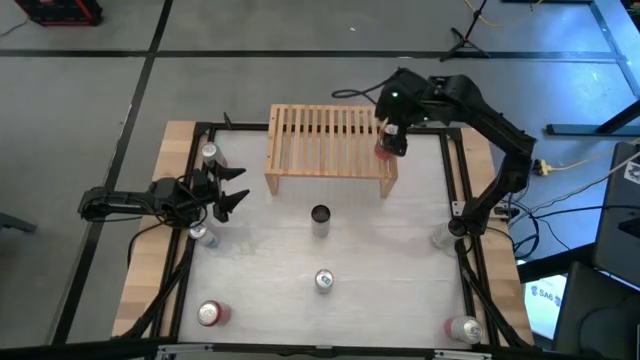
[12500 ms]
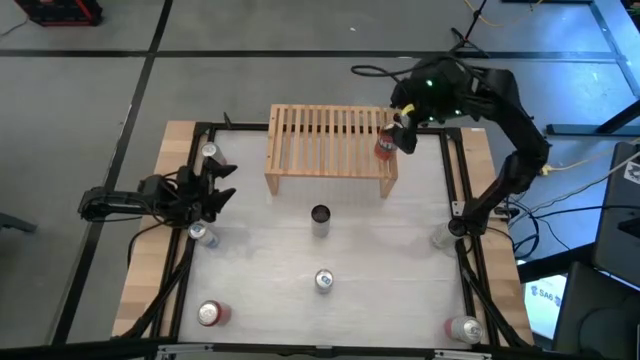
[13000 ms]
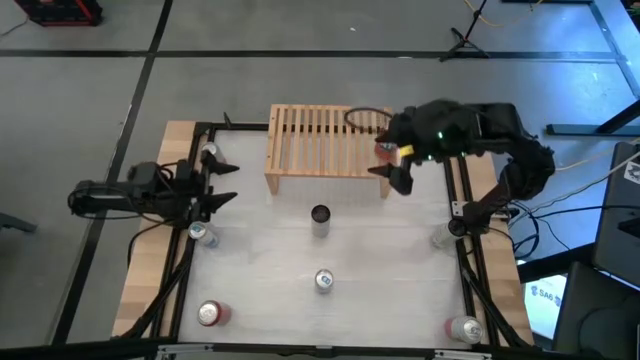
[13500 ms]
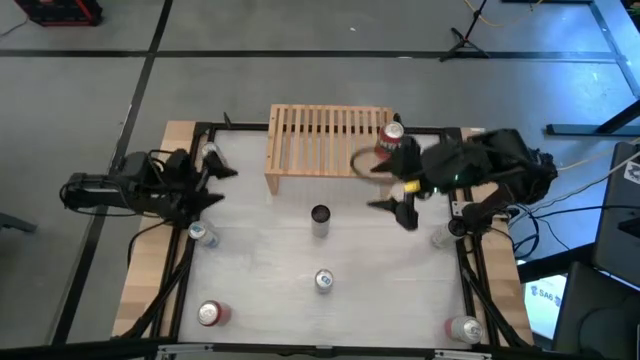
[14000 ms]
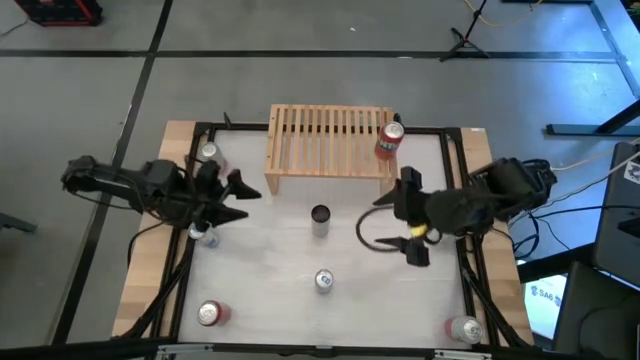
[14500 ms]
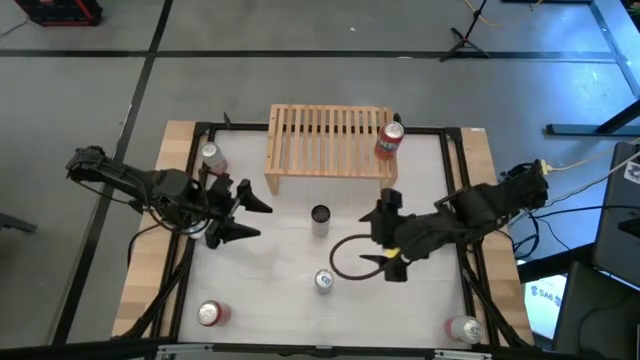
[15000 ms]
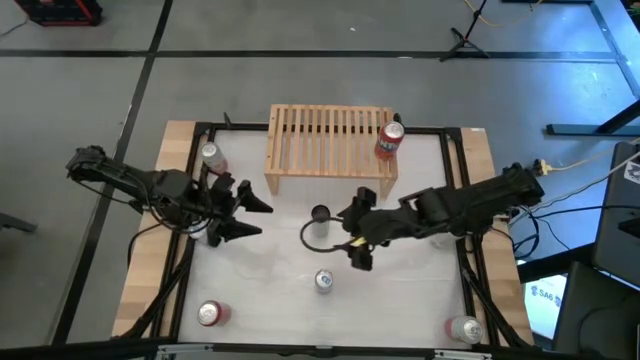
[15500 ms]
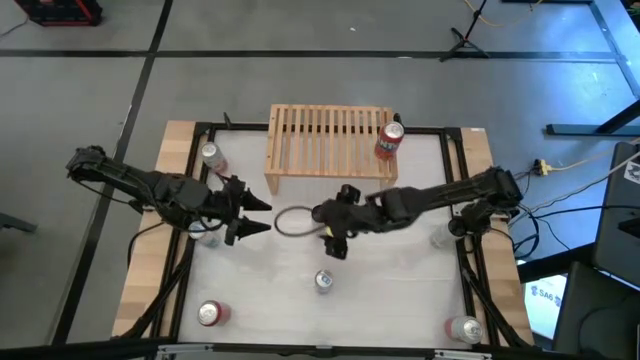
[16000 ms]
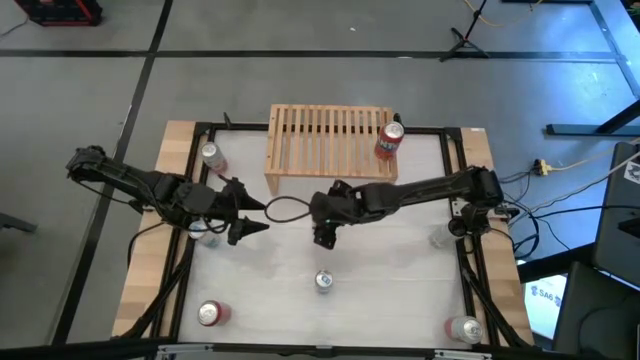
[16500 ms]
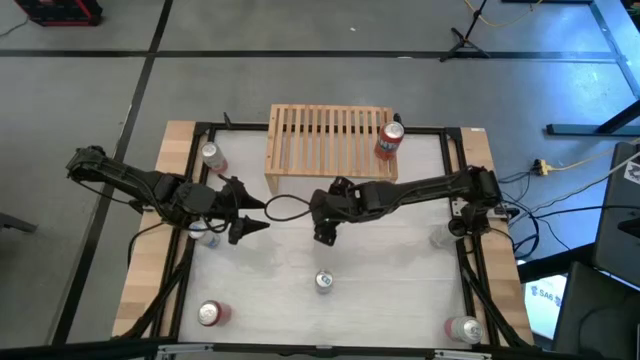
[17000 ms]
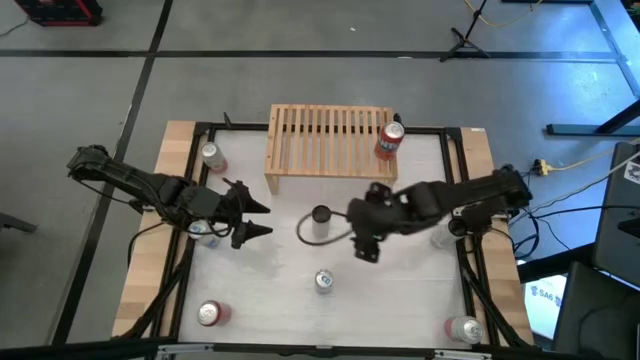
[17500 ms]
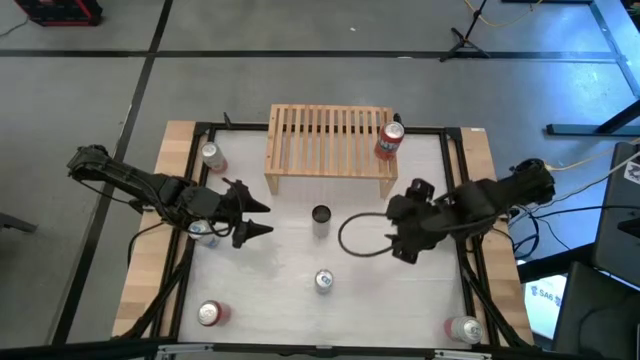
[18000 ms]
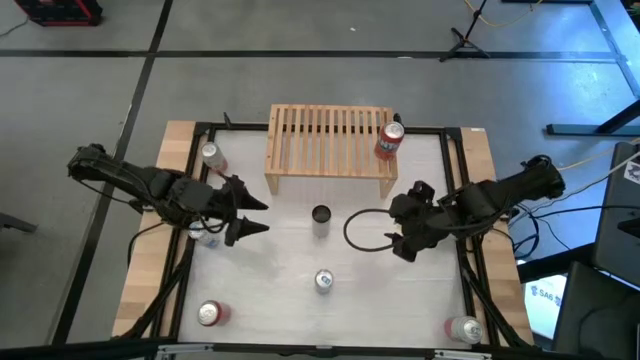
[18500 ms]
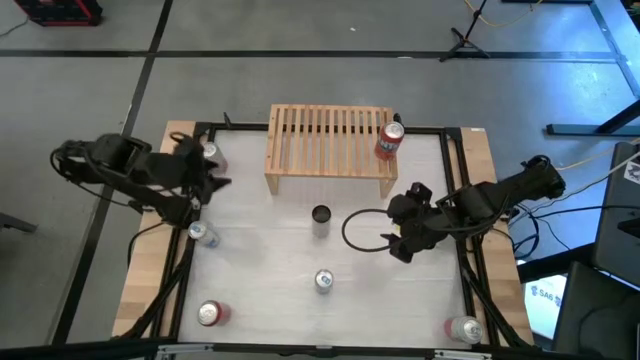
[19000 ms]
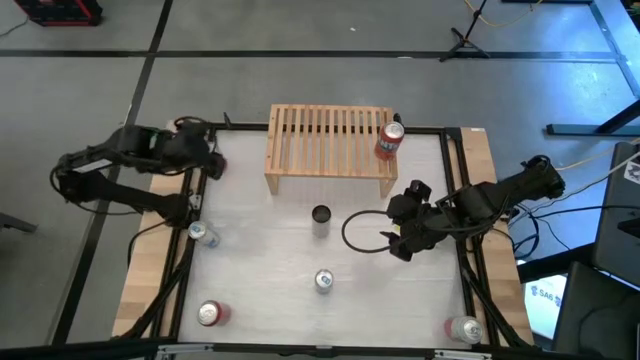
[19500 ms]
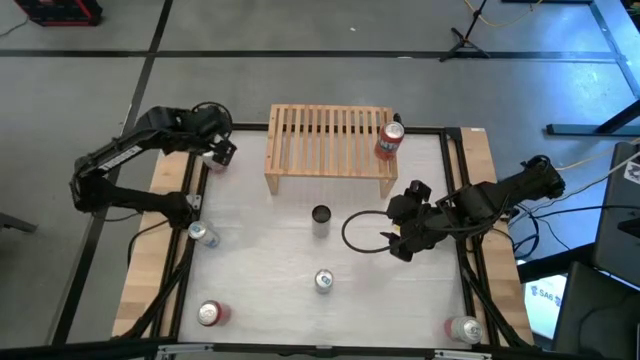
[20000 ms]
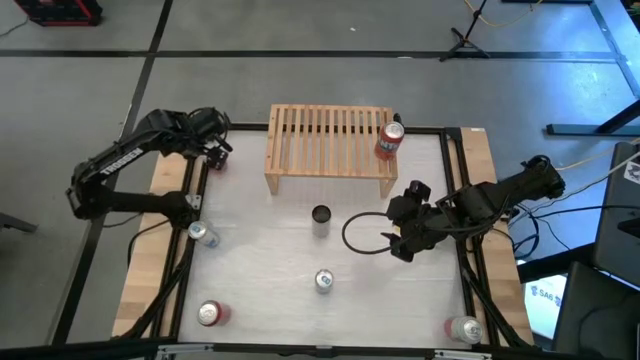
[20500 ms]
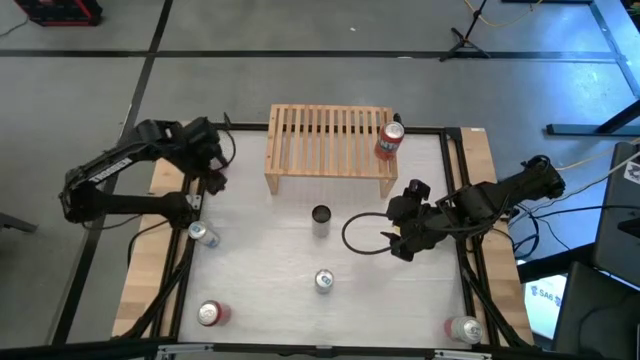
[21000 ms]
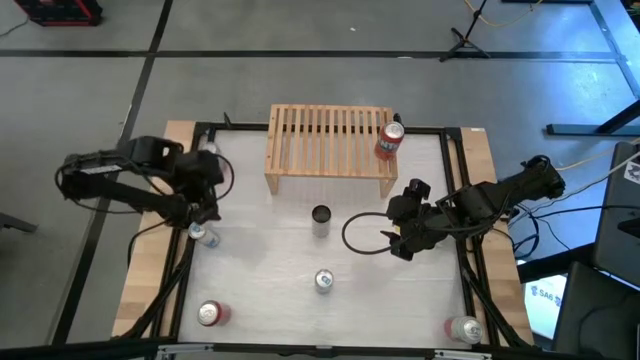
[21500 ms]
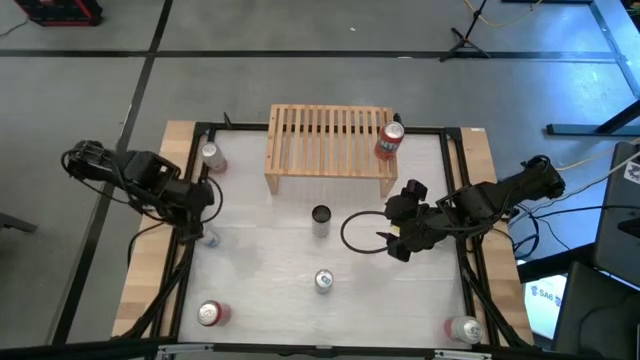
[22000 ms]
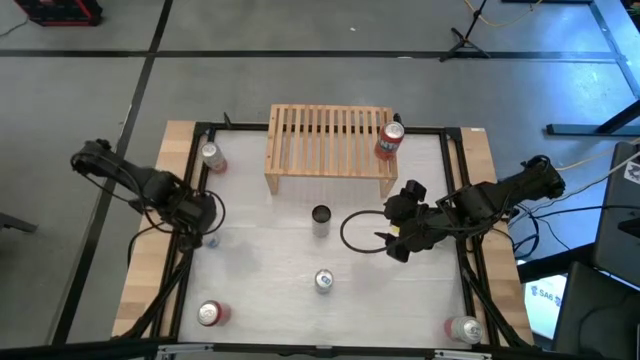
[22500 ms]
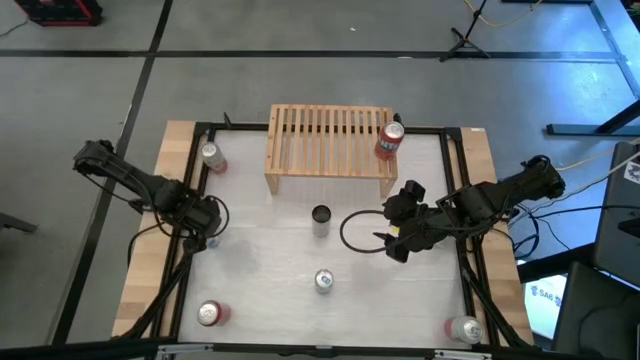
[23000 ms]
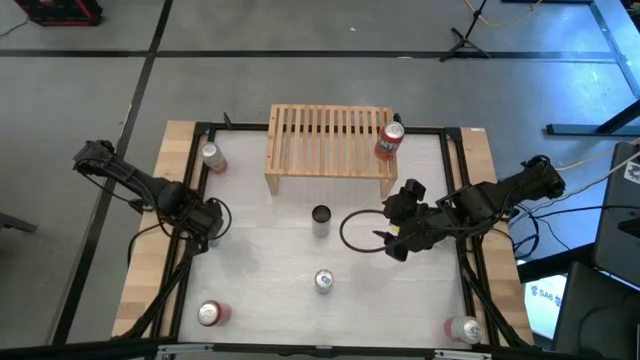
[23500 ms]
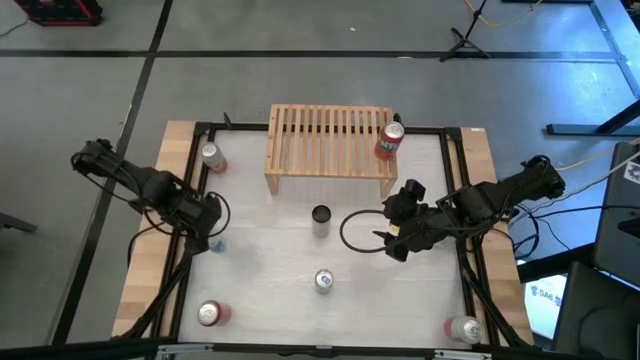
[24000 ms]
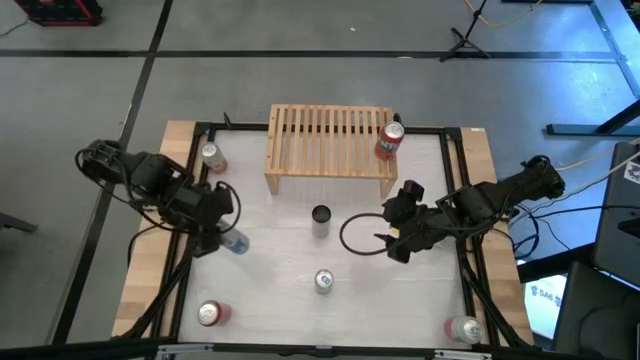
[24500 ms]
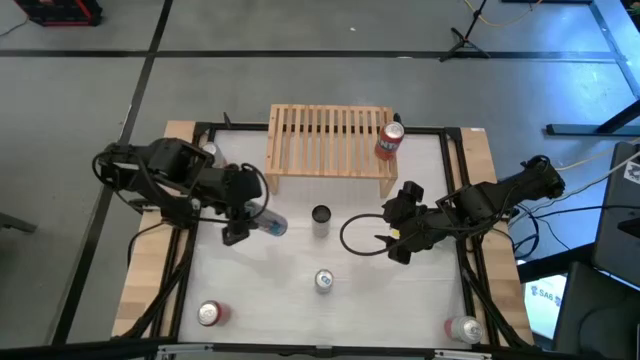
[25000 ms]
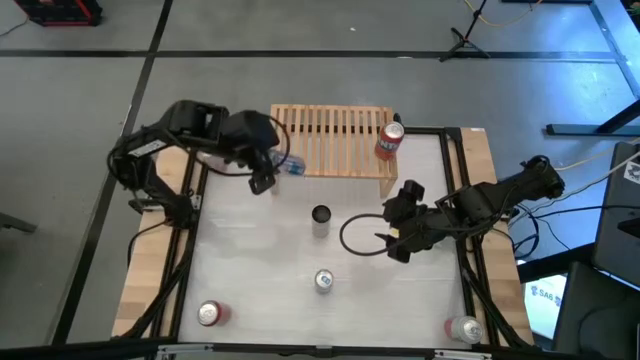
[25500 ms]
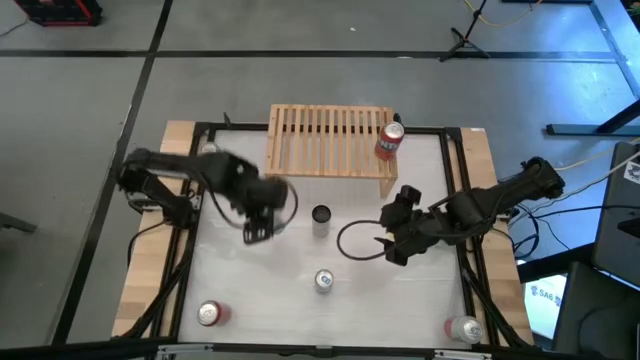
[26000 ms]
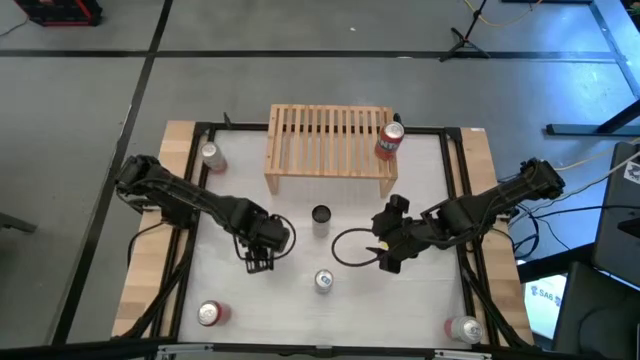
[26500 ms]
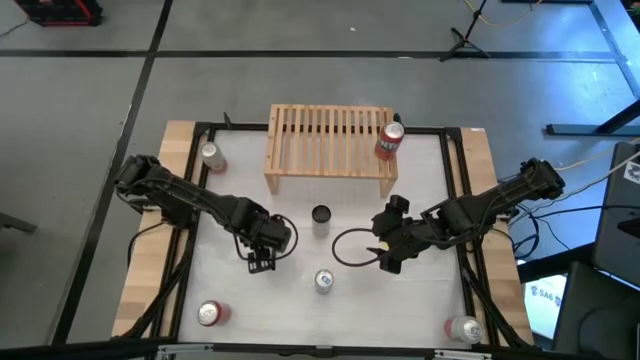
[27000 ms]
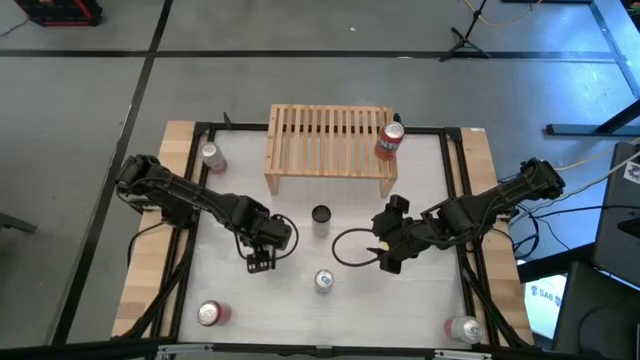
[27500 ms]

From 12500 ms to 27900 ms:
Task: Place canned beverage on shelf
Move the top blue soda can

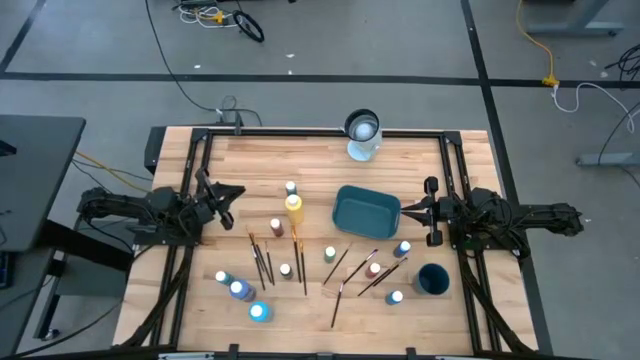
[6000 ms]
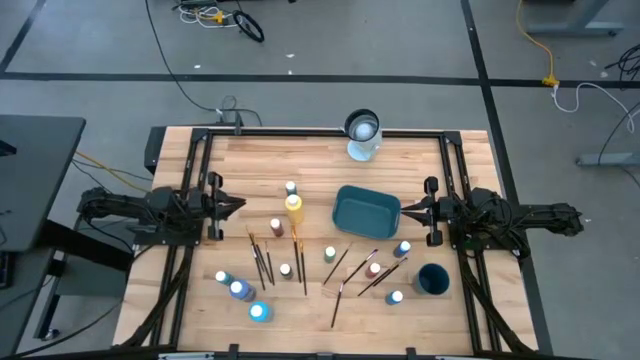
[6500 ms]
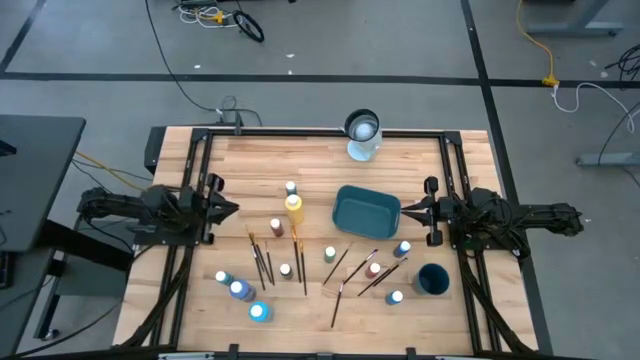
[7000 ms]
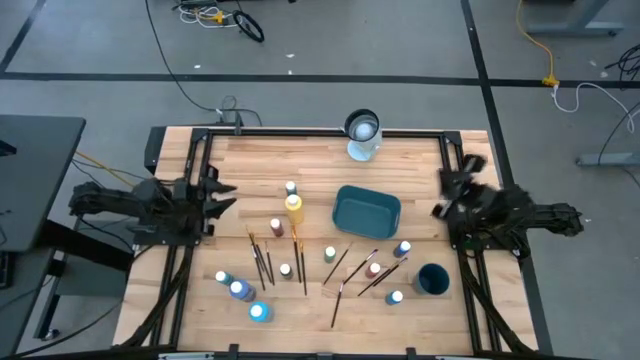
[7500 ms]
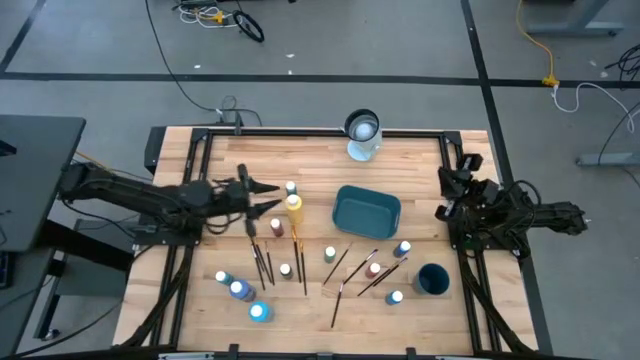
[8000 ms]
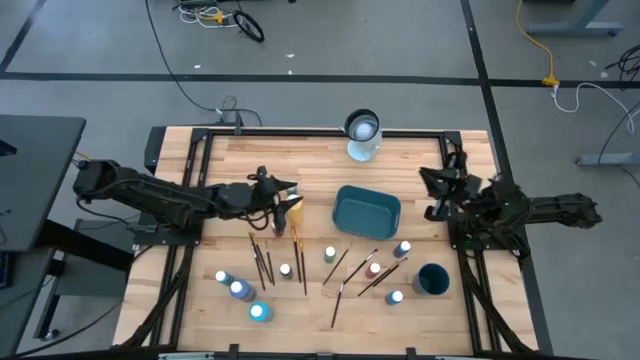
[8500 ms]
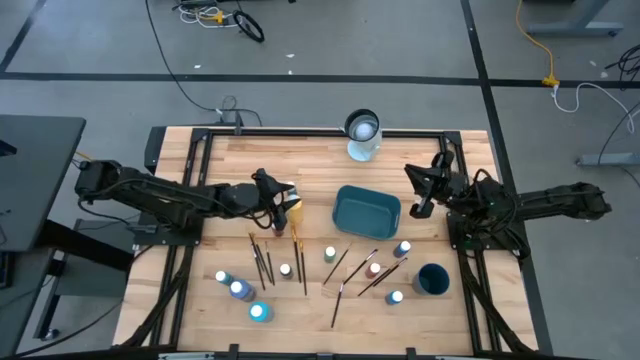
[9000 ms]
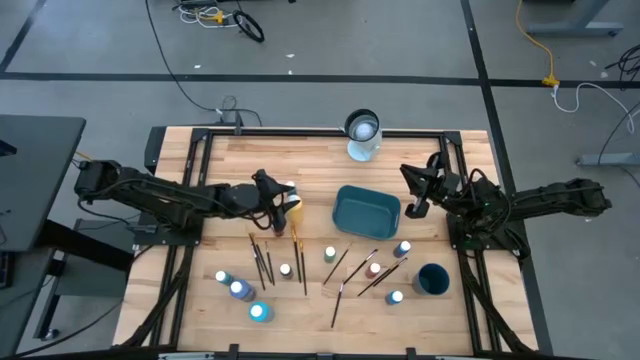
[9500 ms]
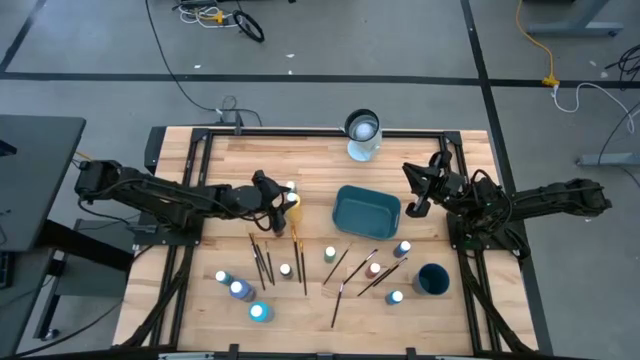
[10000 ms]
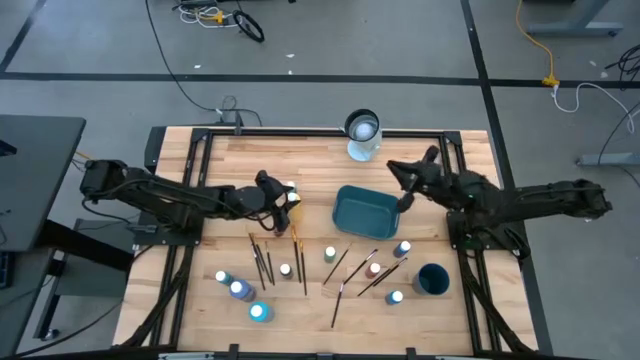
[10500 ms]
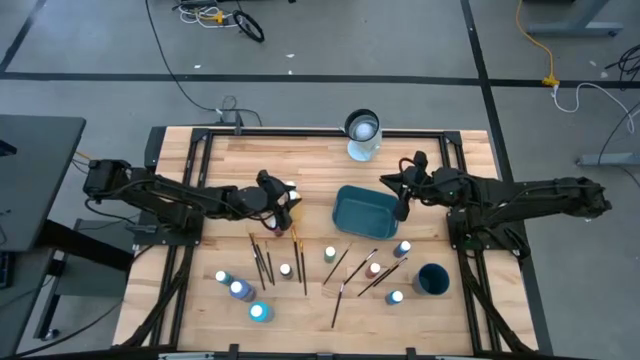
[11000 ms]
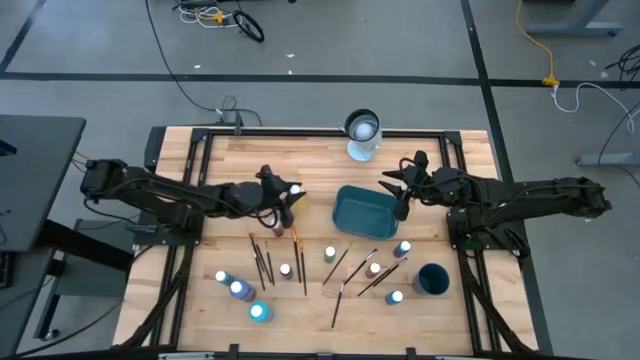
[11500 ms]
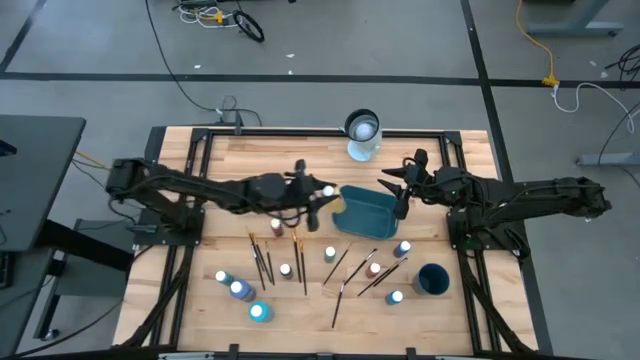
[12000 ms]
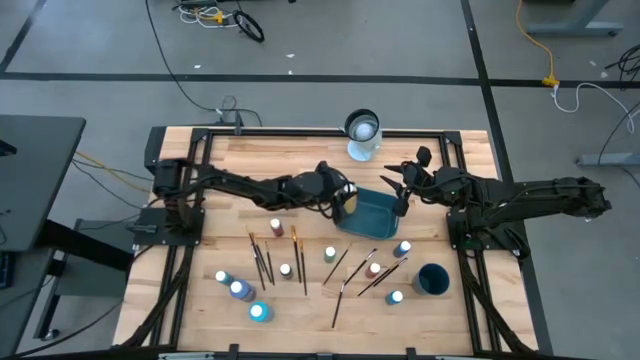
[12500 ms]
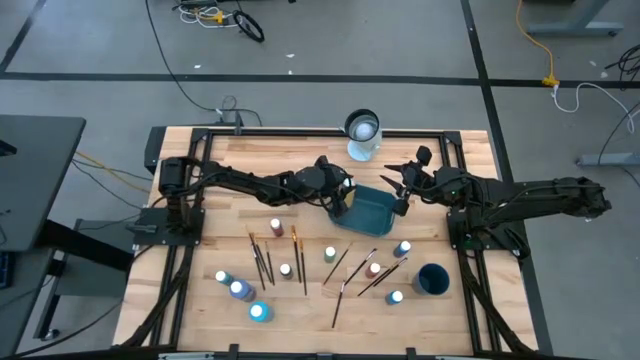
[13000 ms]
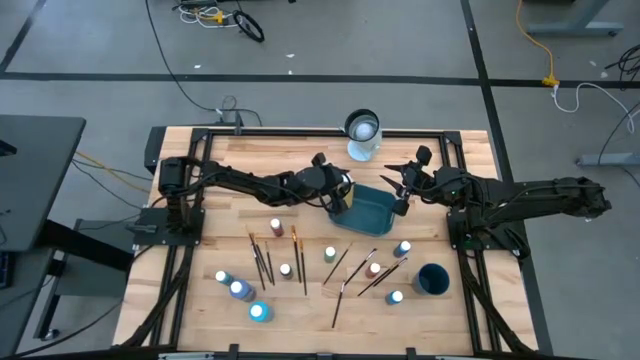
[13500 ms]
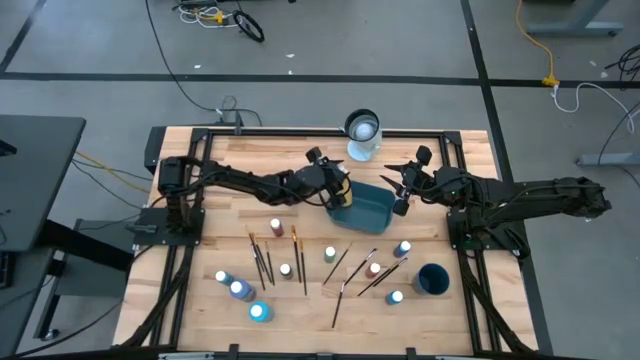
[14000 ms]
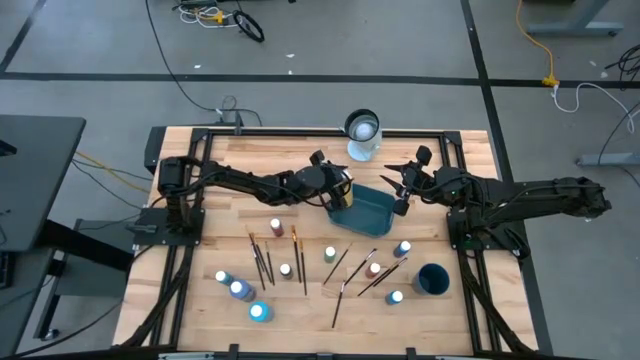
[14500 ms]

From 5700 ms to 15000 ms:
Task: Pick & Place Paint Supplies
Put the large yellow paint bottle into the green bin
